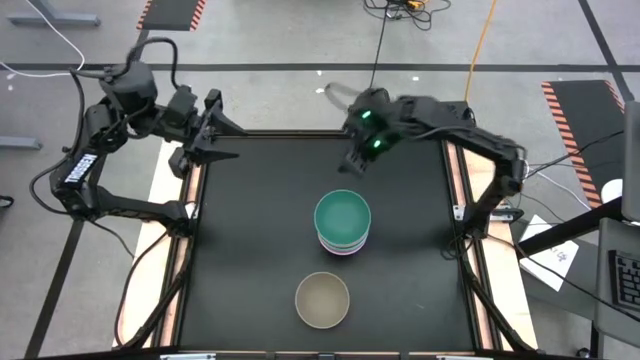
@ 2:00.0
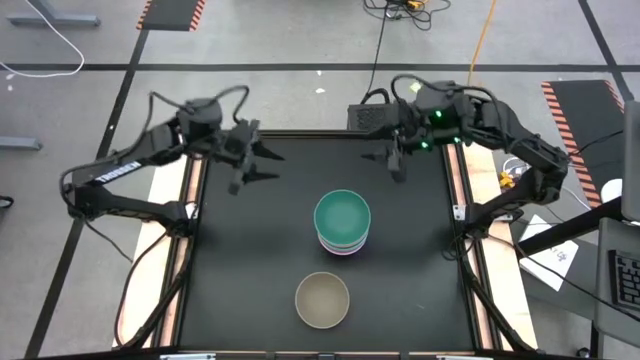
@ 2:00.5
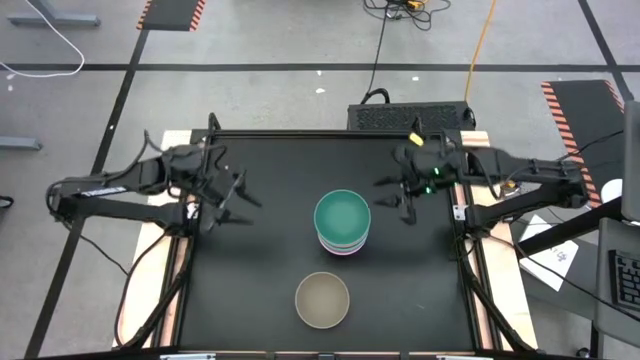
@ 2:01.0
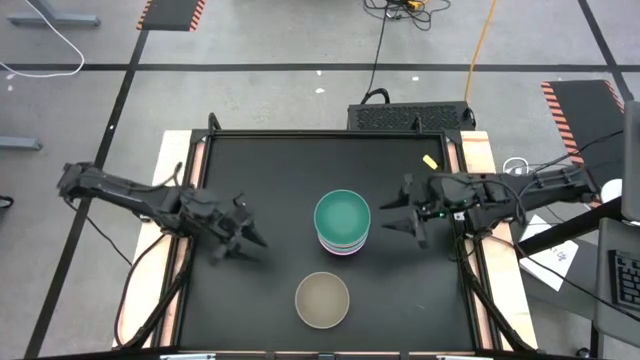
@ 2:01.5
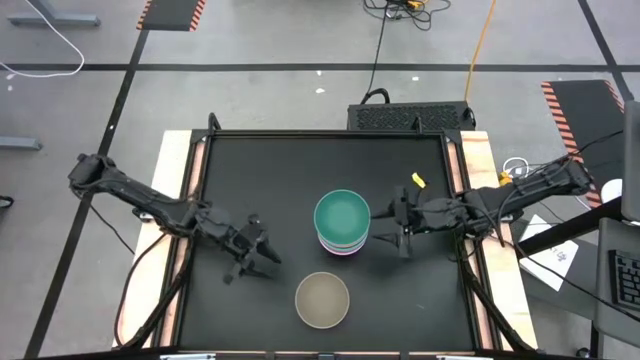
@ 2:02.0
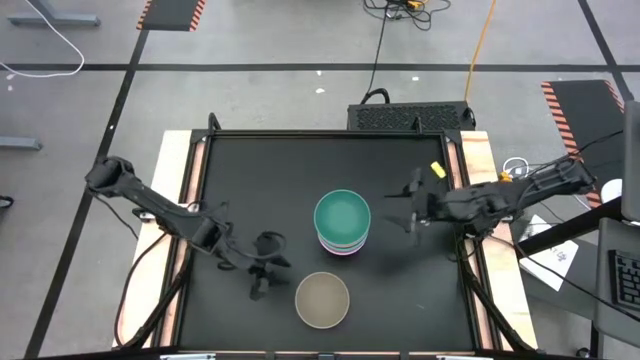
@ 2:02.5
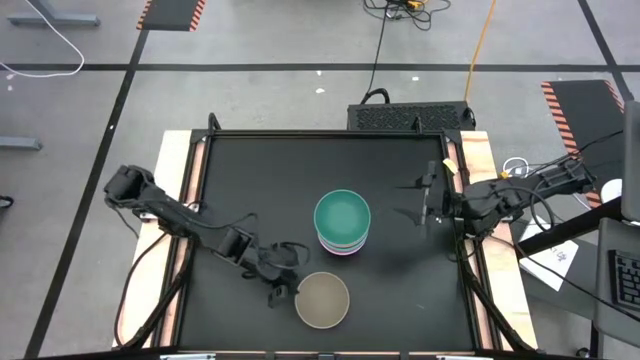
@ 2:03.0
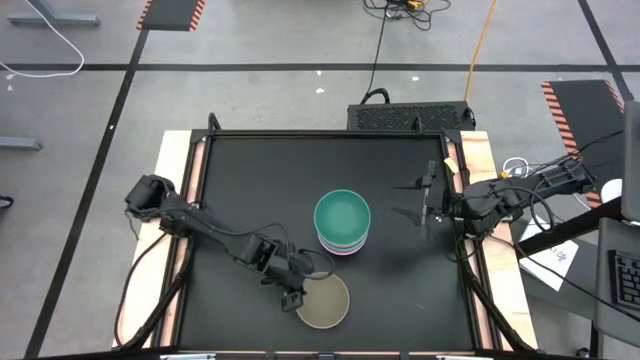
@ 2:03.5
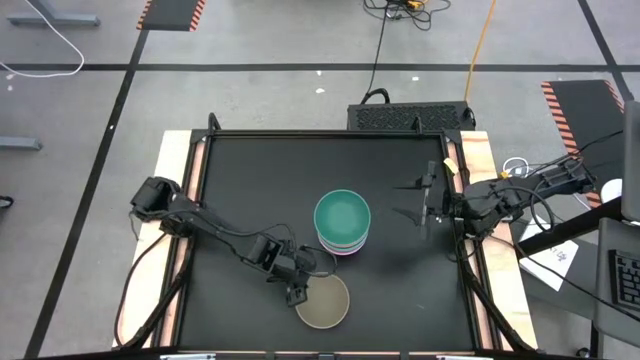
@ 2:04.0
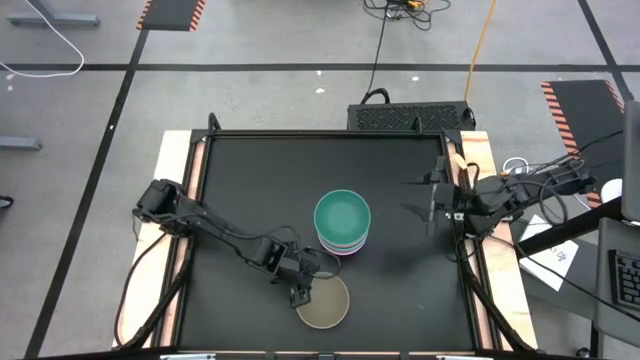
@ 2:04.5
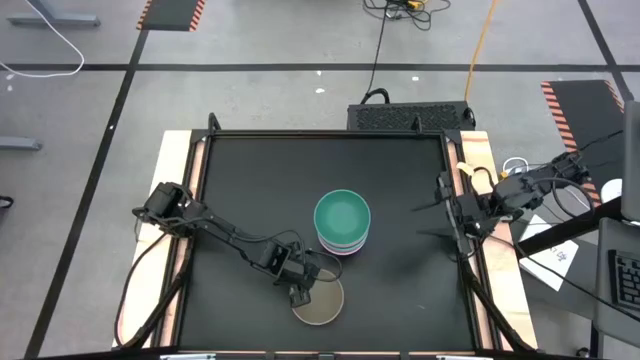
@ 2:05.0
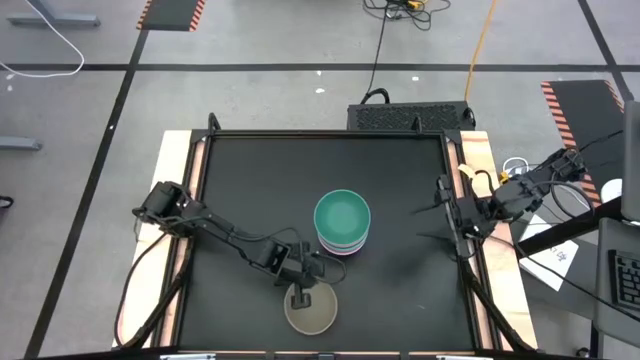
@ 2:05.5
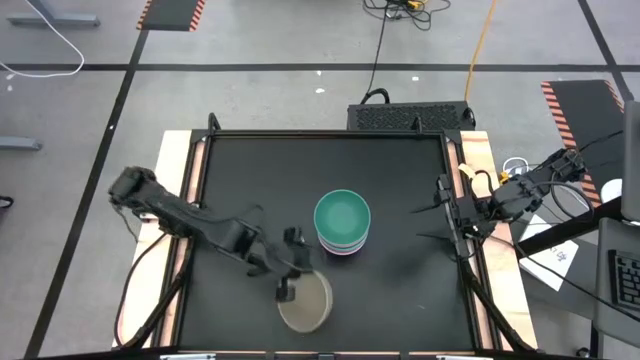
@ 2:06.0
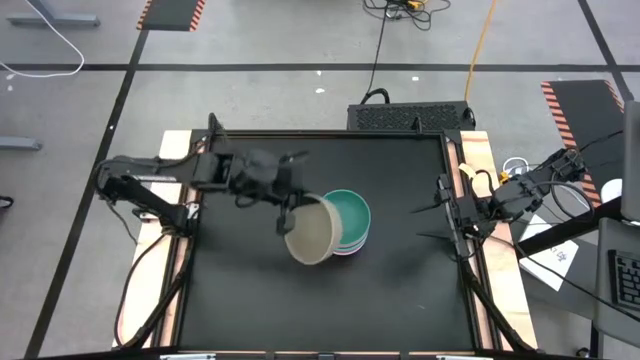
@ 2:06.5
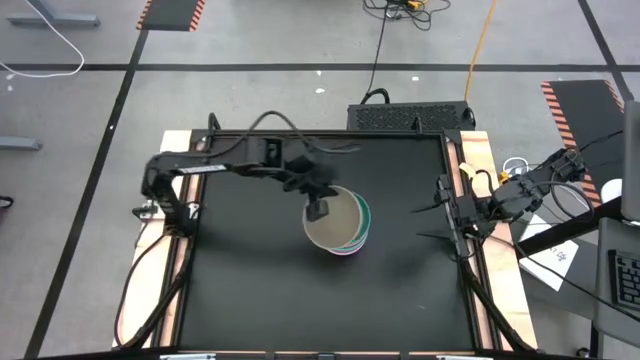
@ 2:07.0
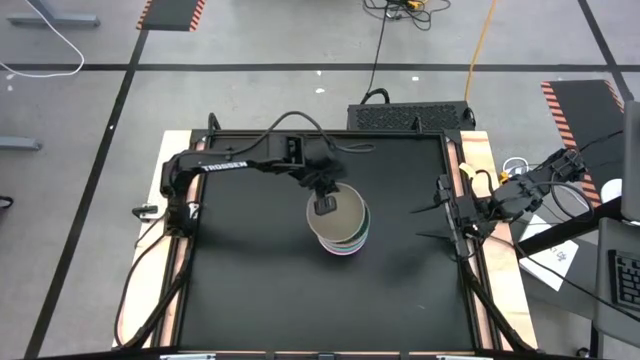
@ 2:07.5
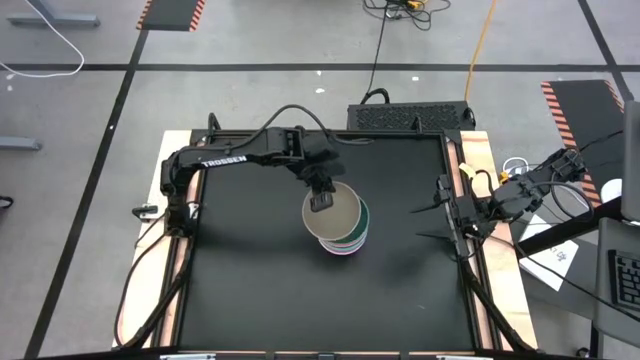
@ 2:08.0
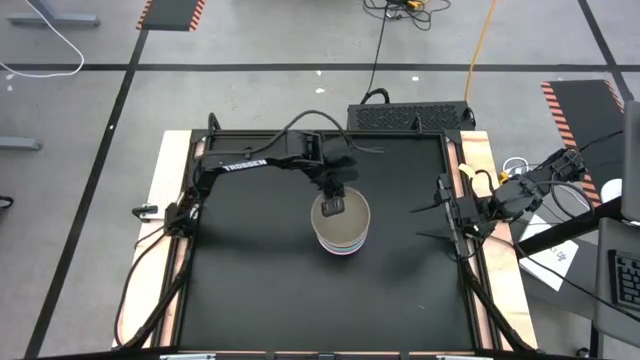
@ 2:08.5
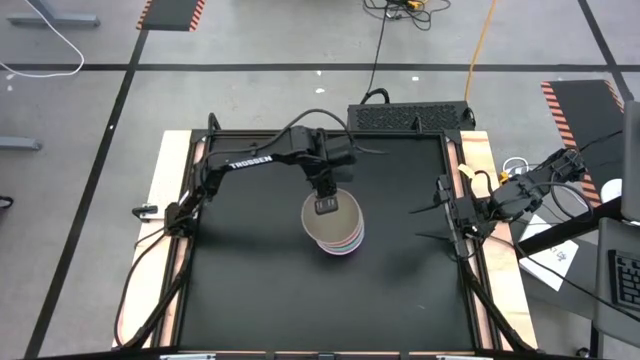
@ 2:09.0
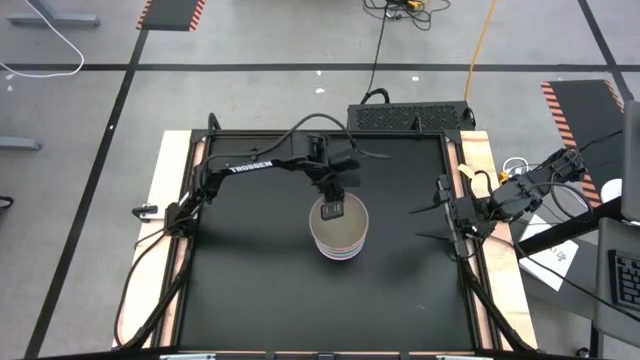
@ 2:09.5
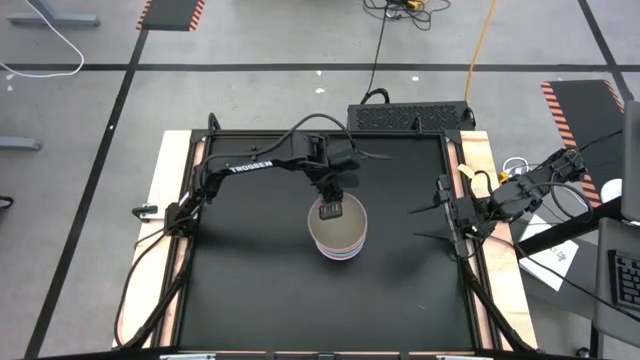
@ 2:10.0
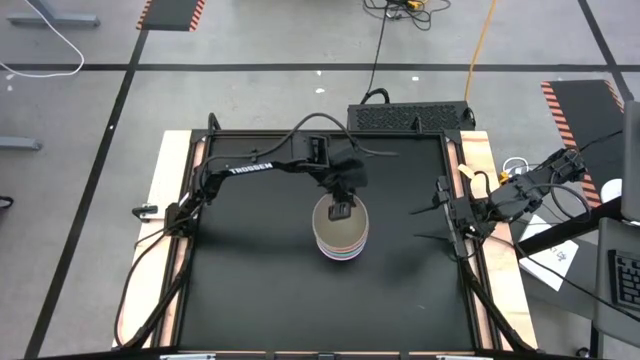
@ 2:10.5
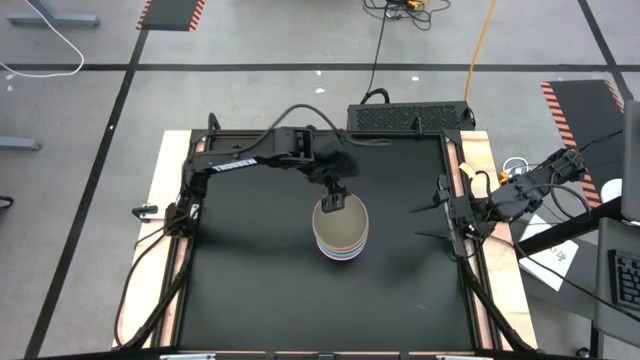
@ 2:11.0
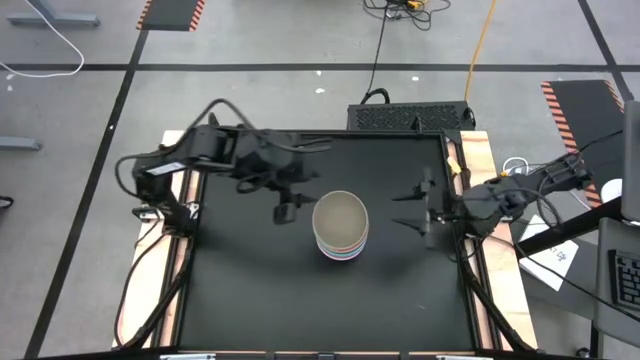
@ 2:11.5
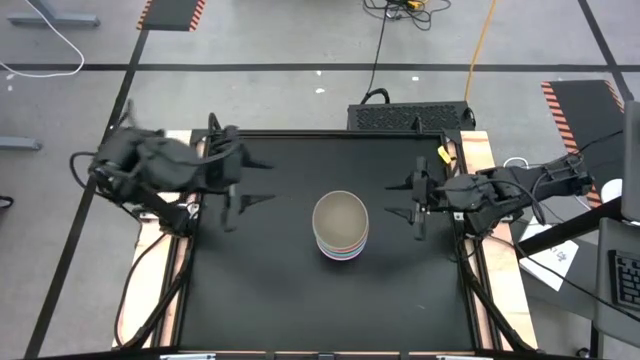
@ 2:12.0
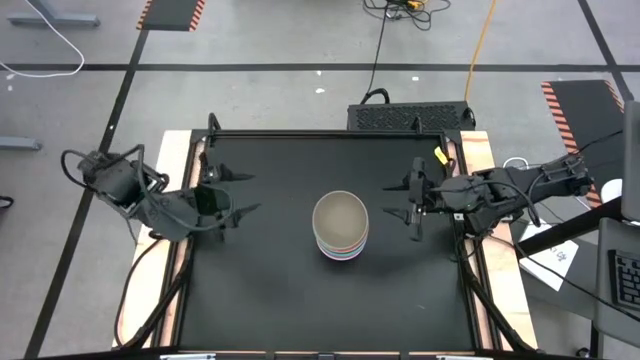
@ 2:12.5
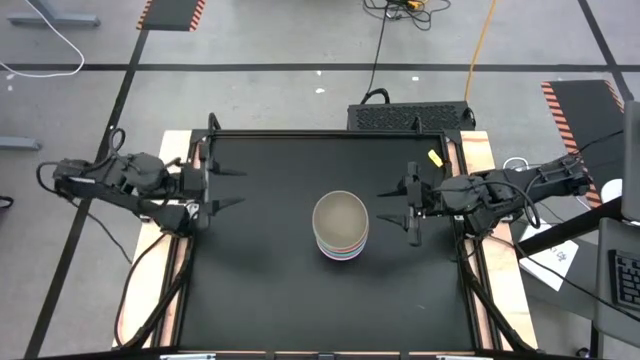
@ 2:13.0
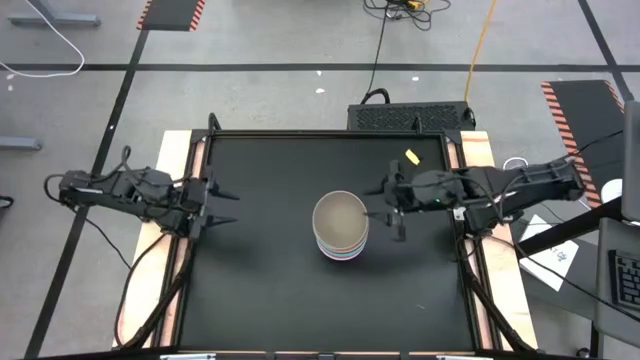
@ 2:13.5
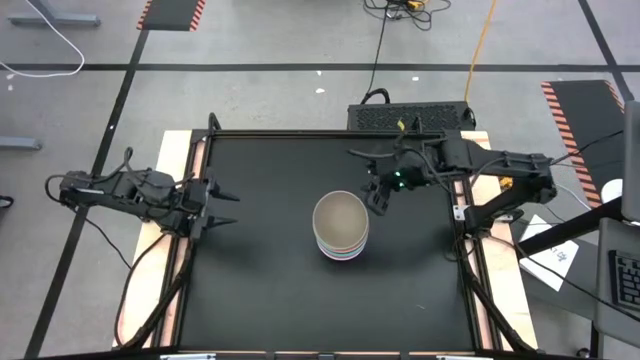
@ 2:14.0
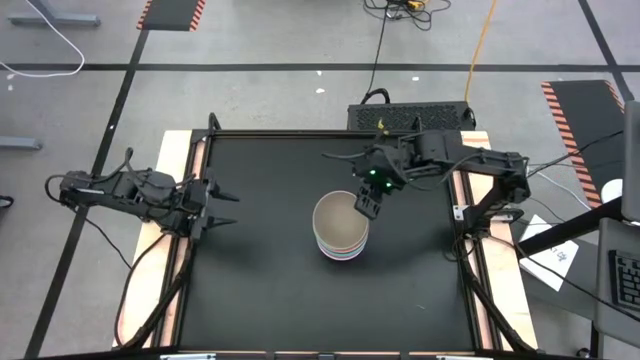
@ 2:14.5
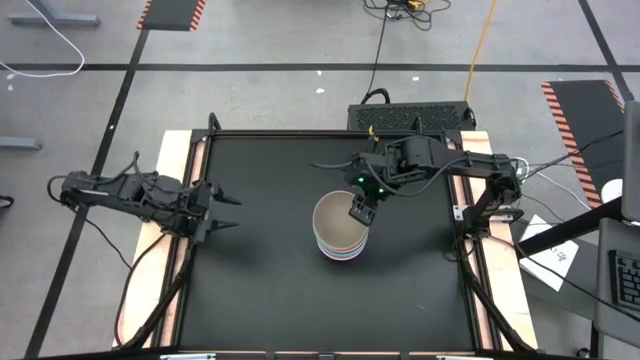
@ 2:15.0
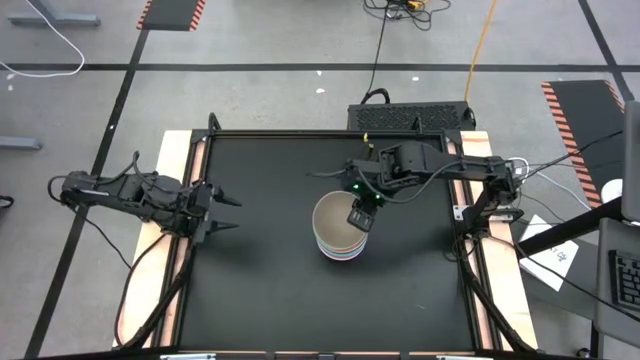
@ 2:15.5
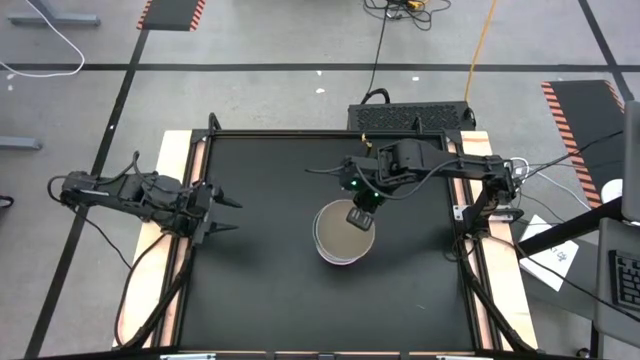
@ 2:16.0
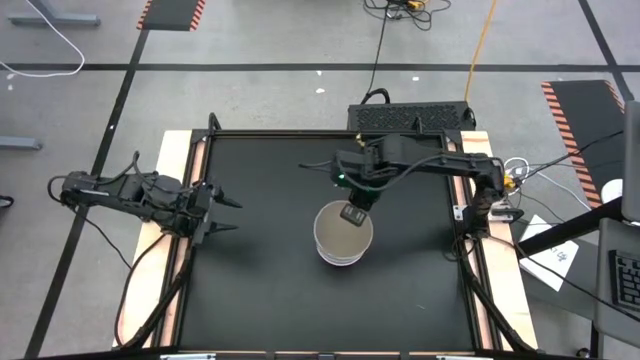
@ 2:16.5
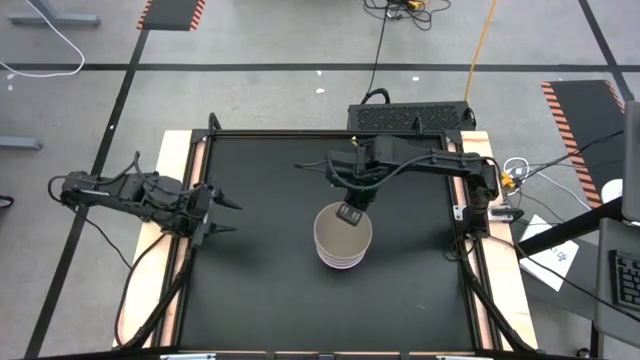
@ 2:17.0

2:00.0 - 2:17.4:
Task: Nest bowls inside each other
Stack the gray bowl on top of the dark green bowl

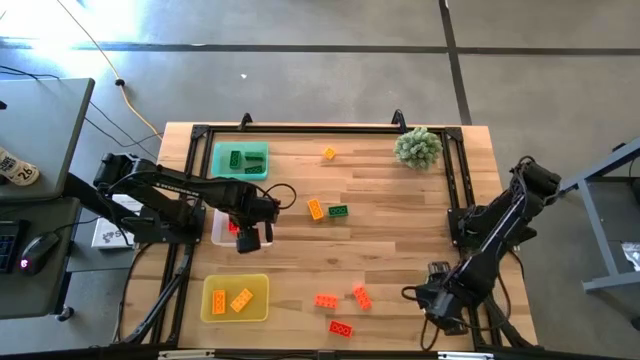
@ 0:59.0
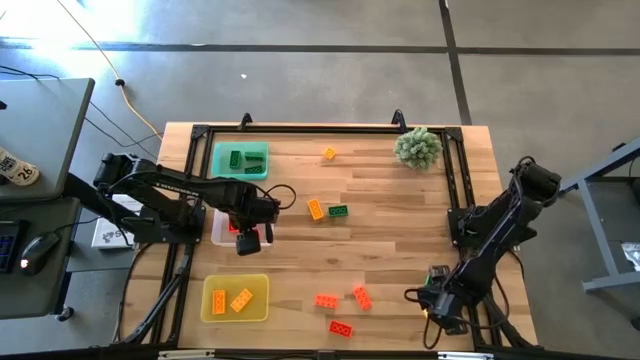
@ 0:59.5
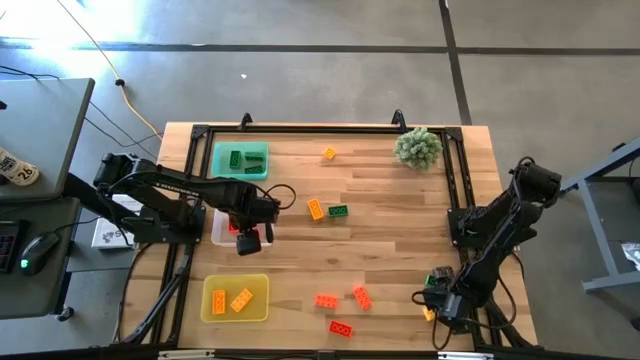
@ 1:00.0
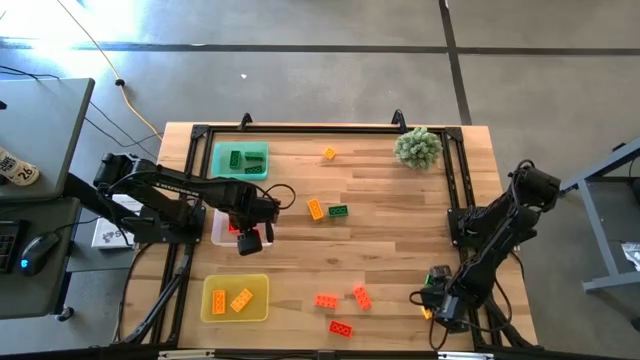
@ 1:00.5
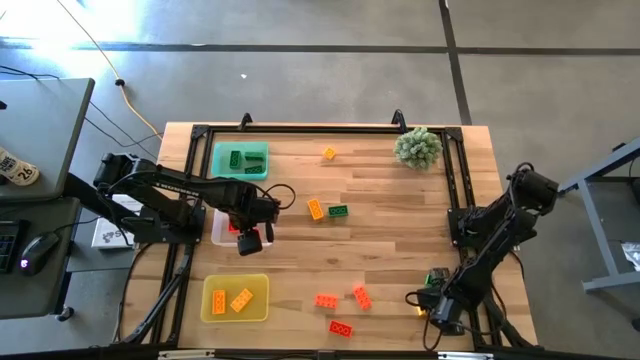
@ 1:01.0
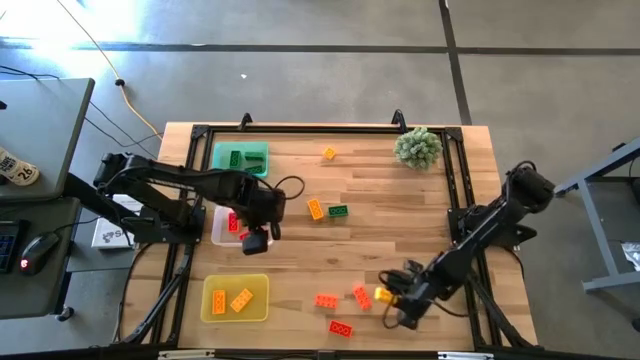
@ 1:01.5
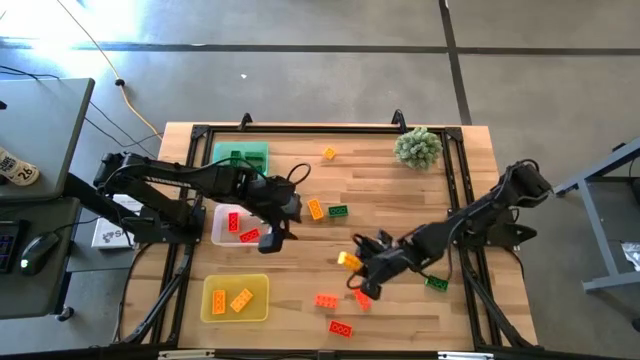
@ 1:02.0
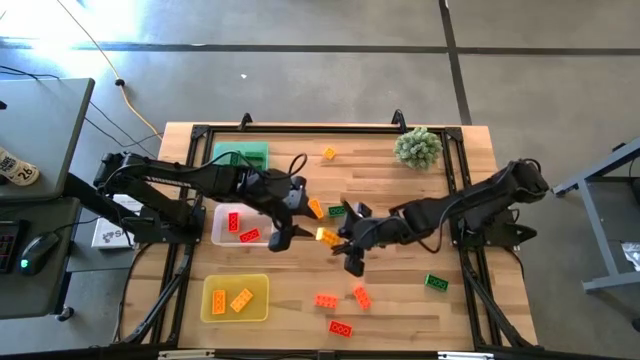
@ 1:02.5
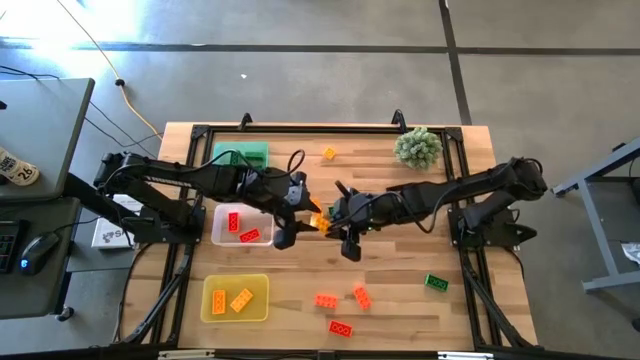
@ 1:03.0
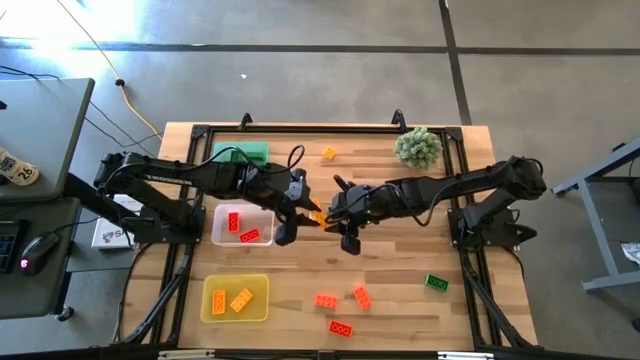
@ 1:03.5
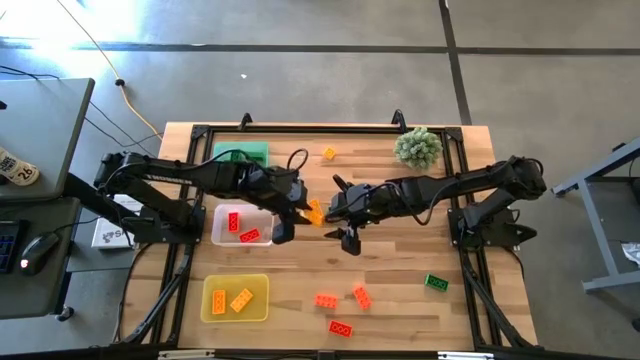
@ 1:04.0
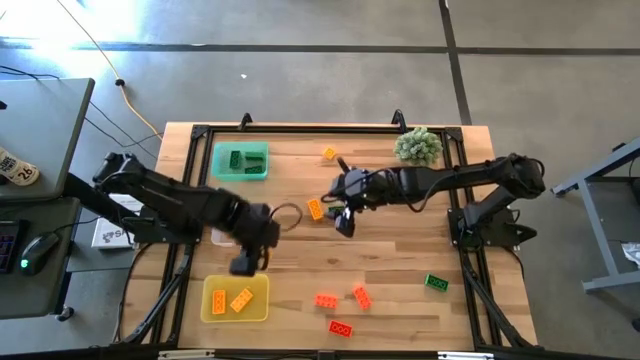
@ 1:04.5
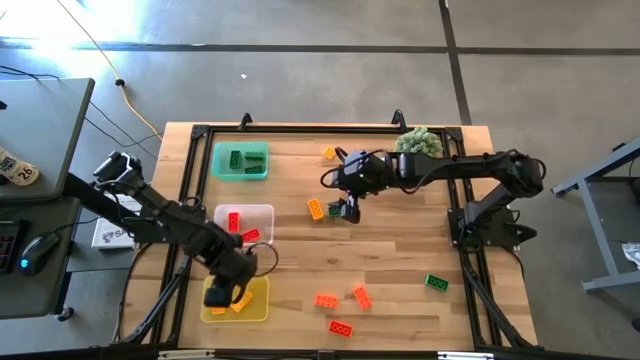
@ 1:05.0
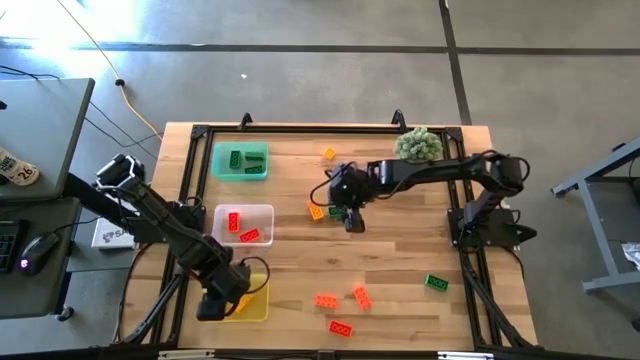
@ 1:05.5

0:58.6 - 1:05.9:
Task: Sort & place blocks by color
Put the yellow game piece into the yellow bin
